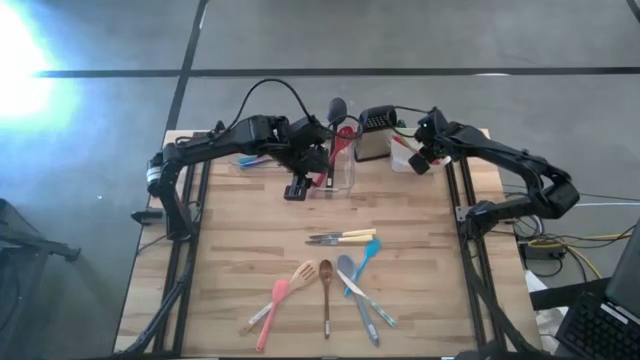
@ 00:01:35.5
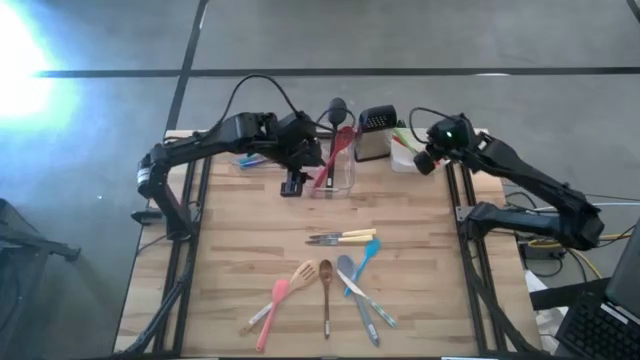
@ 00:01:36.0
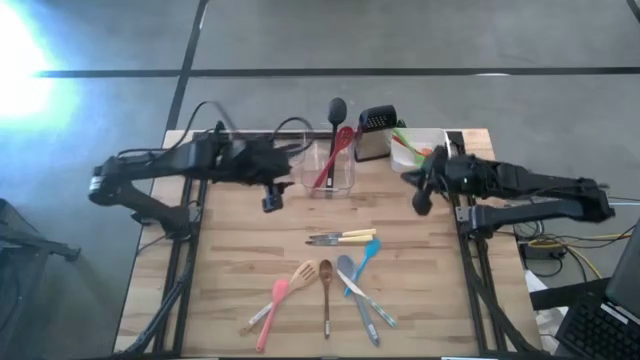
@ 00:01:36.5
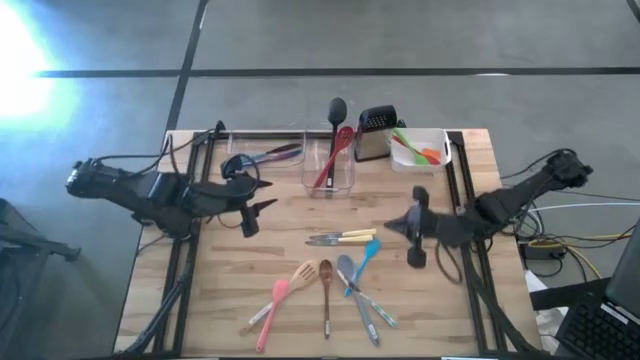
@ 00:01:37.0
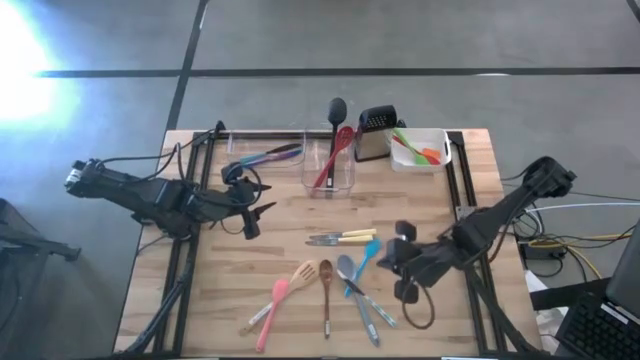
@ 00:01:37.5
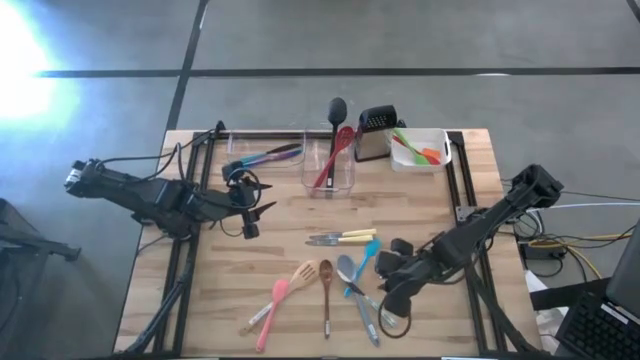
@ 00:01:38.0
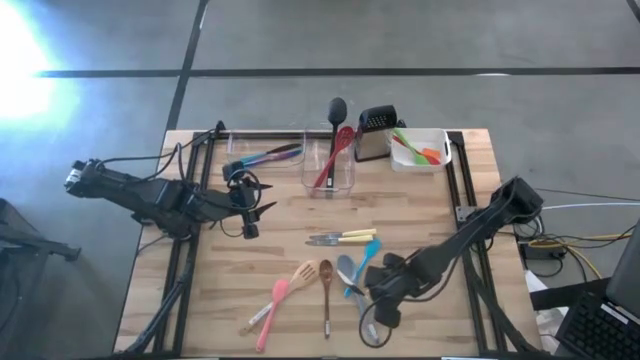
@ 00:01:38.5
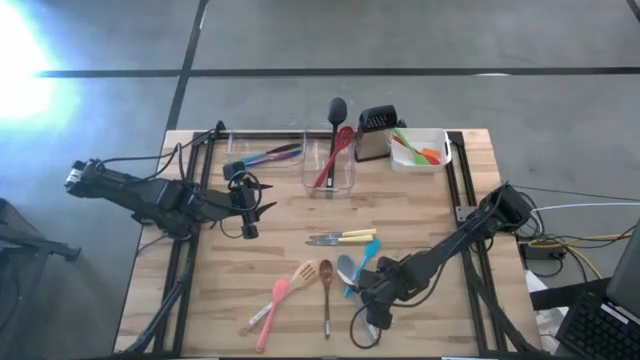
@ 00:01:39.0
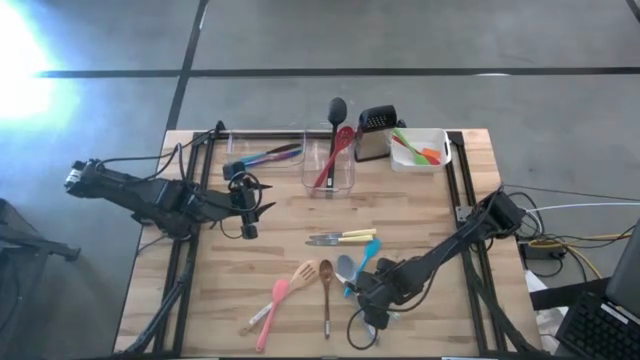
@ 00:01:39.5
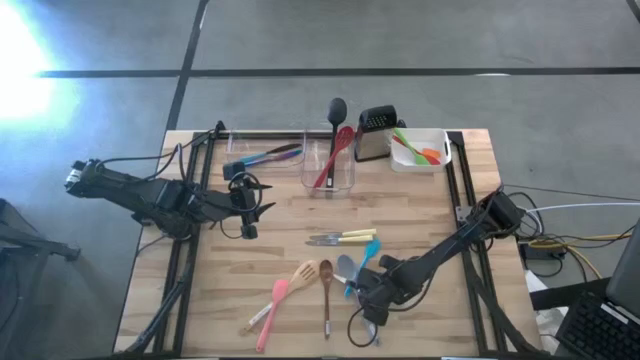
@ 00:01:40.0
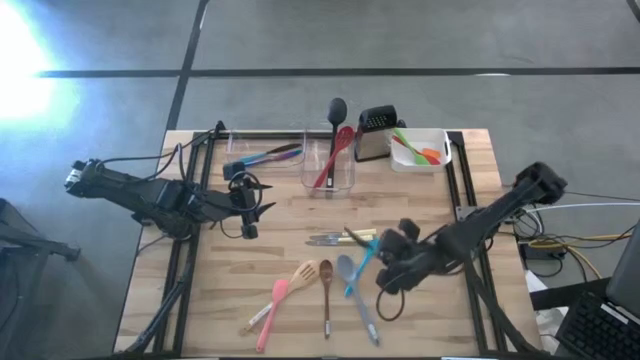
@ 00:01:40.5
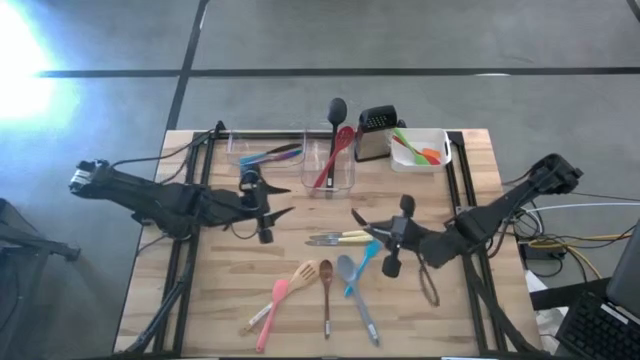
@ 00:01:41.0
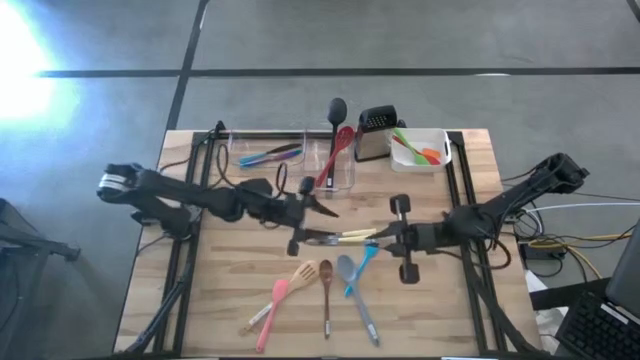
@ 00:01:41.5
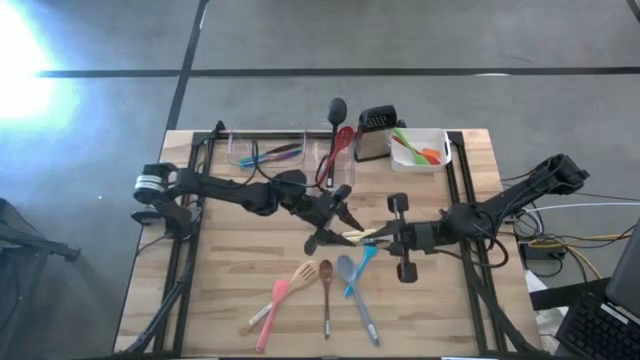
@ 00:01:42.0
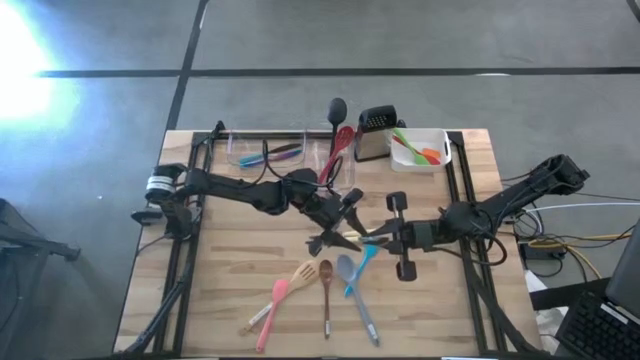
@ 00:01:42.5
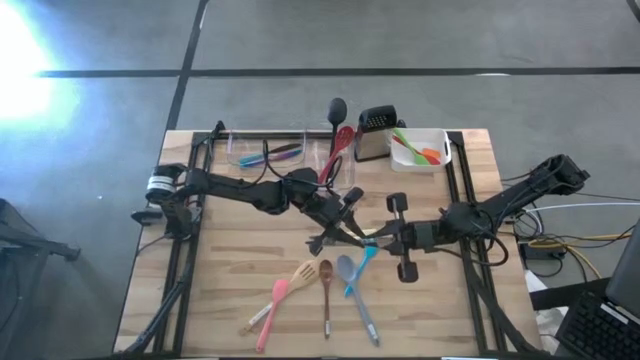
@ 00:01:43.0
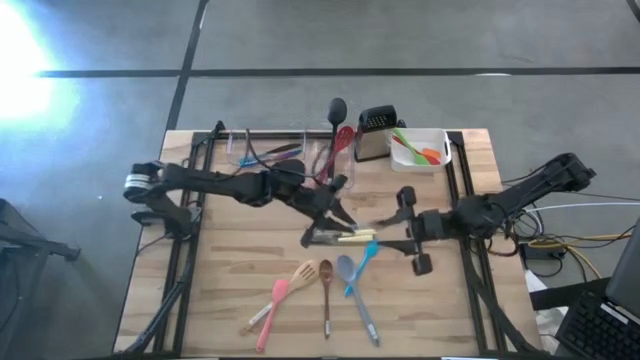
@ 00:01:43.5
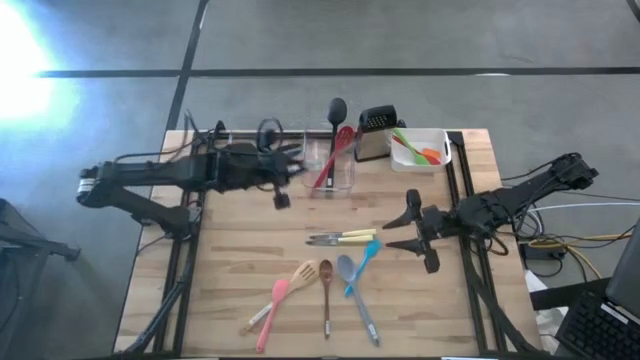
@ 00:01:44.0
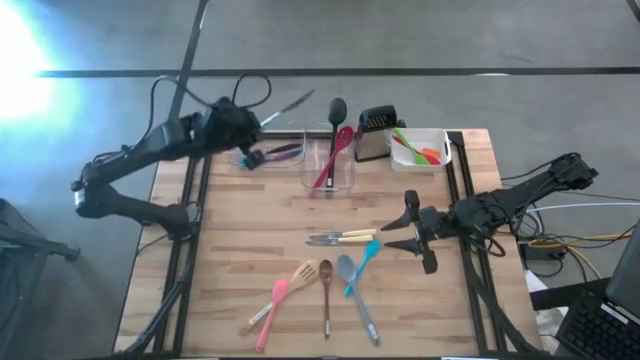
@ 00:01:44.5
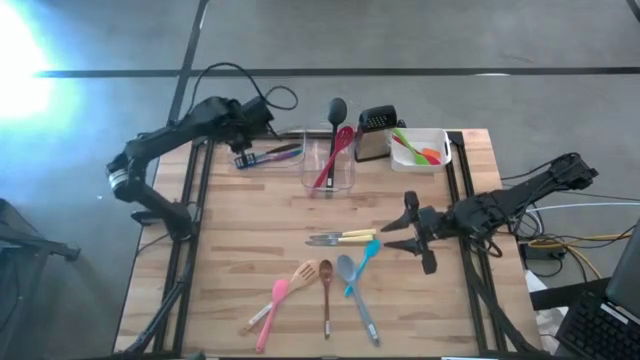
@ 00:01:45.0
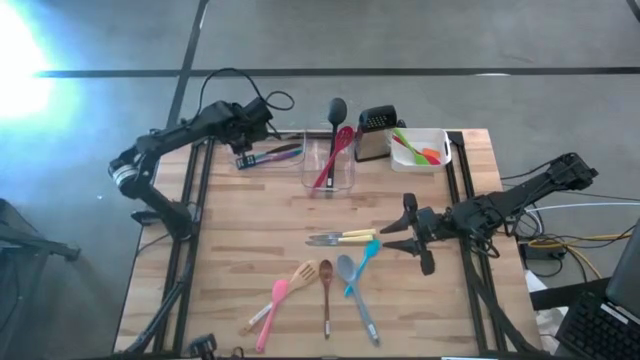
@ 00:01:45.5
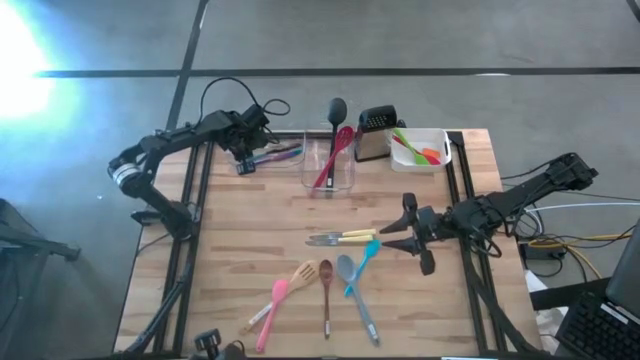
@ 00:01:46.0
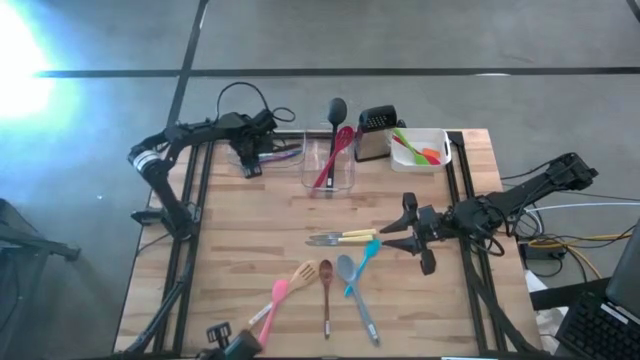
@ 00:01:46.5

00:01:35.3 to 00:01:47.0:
Task: Pick & Place Kitchen Items
Put the blue white knife into the left transparent bin

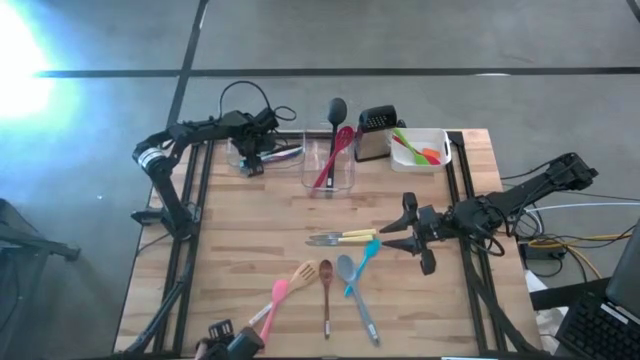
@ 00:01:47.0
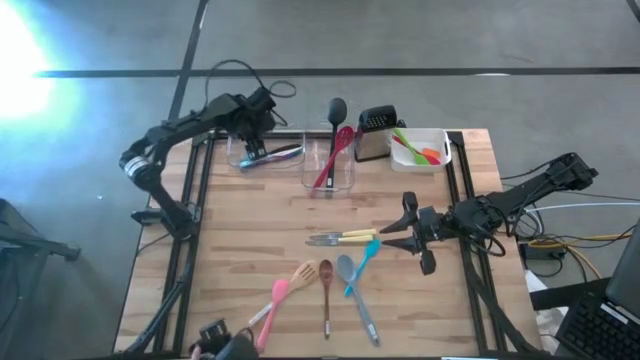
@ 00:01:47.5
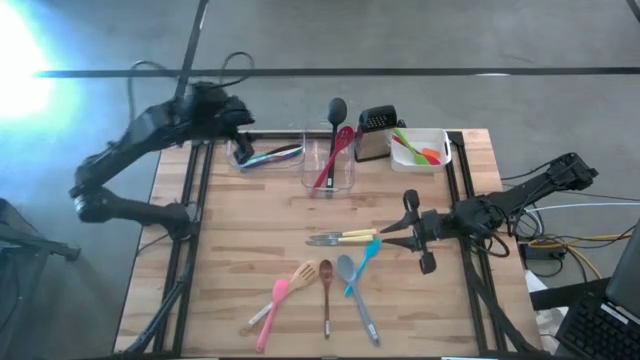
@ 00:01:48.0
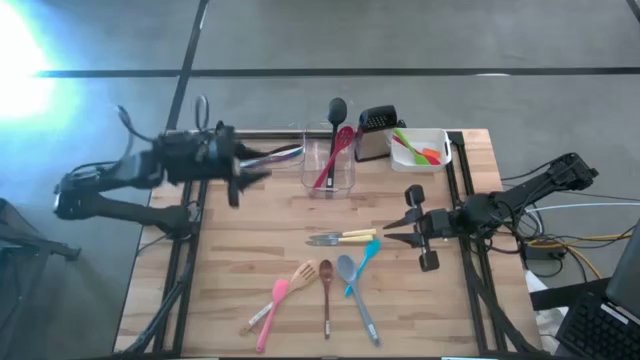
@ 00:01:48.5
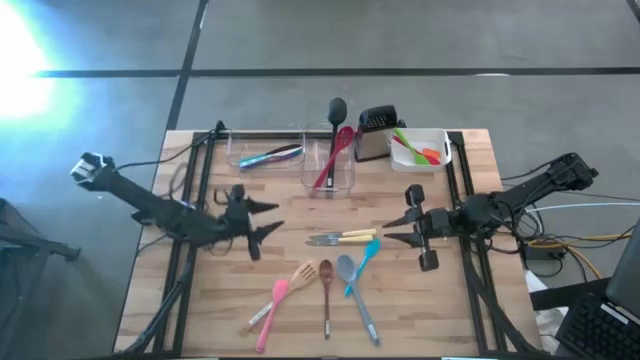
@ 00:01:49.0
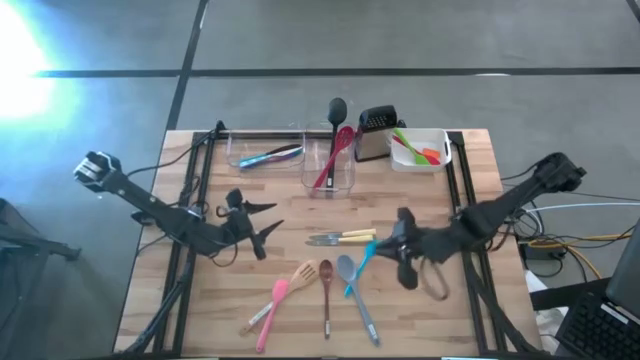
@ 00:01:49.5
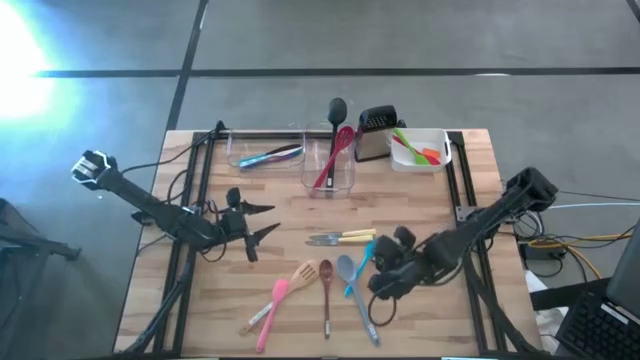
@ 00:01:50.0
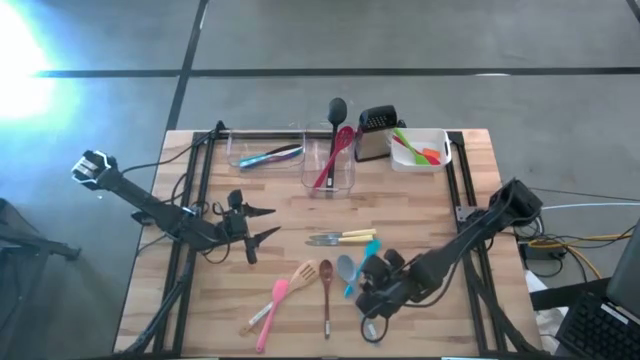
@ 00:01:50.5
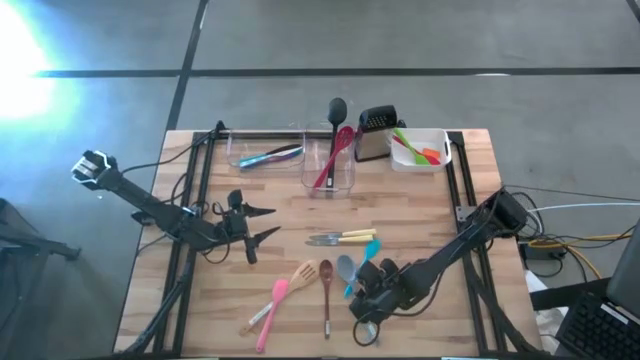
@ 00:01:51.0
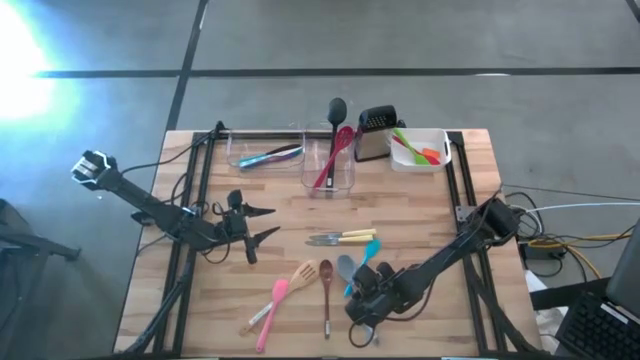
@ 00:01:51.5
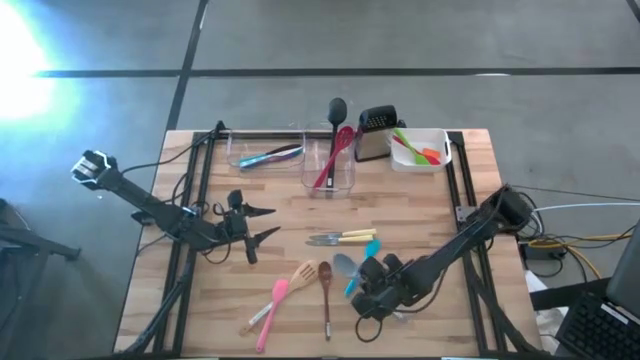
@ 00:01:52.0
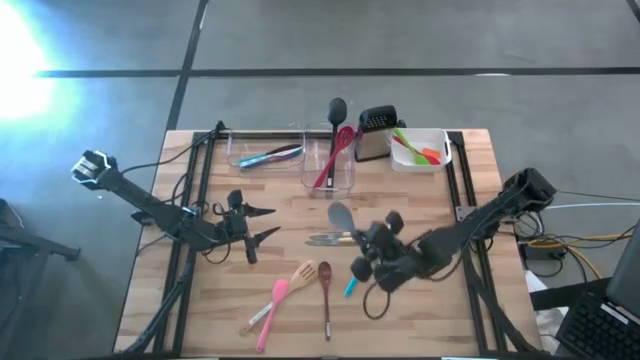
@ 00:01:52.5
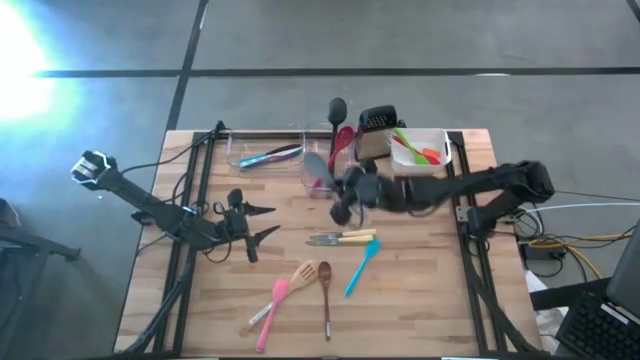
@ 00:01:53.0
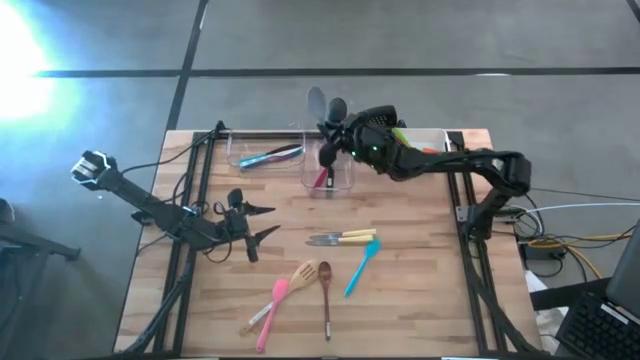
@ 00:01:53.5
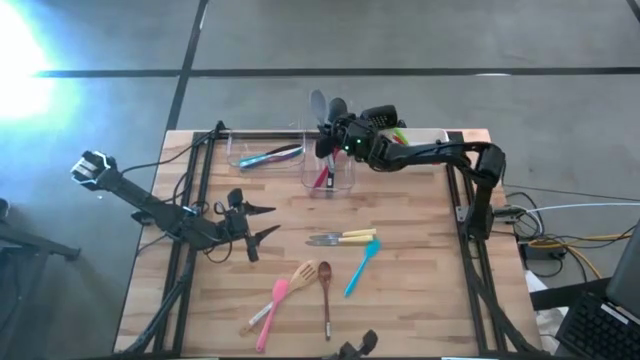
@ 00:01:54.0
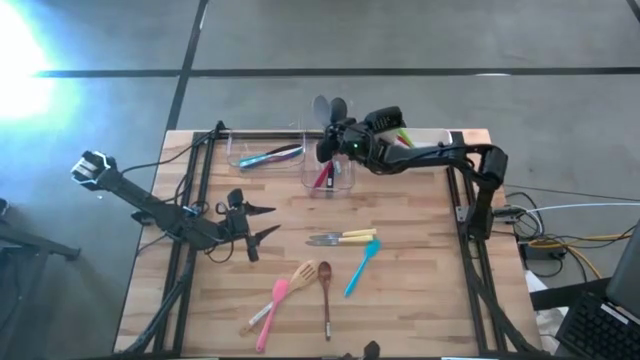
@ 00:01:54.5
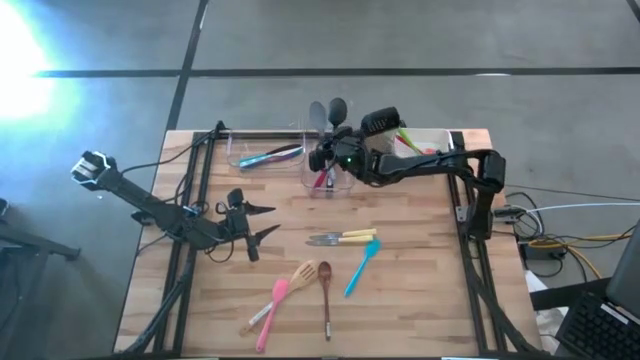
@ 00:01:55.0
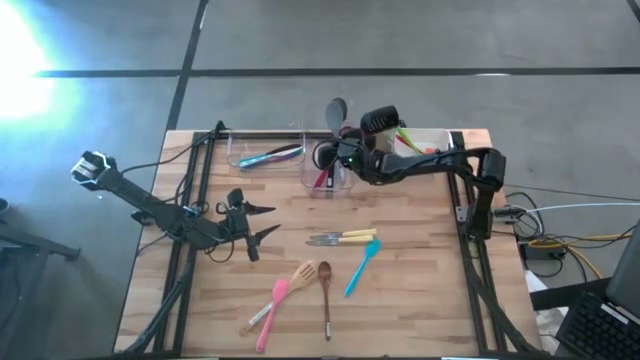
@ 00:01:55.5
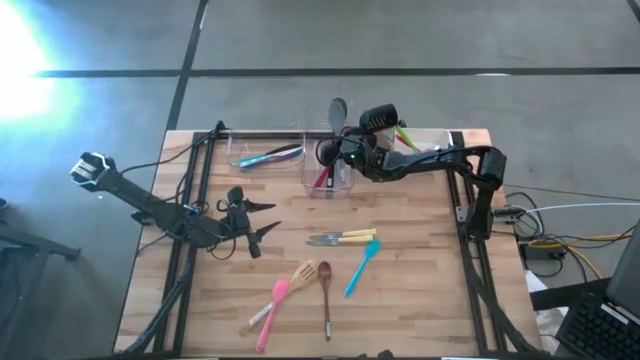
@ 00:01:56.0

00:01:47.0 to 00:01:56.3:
Put the gray serving spoon into the right transparent bin
